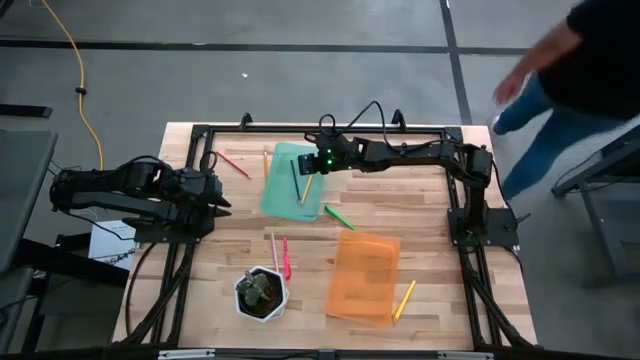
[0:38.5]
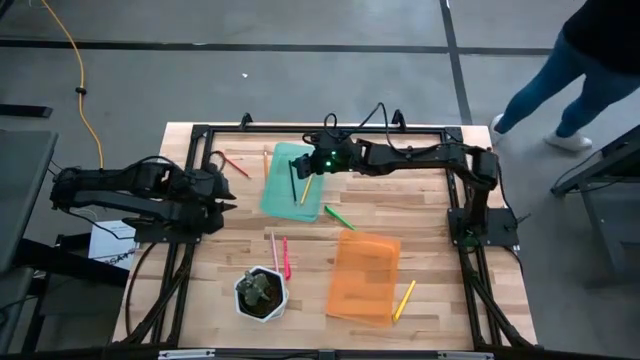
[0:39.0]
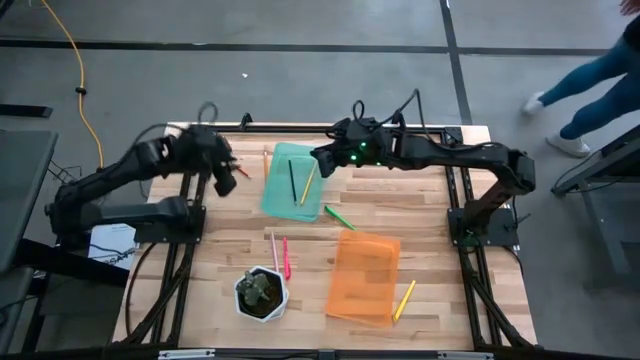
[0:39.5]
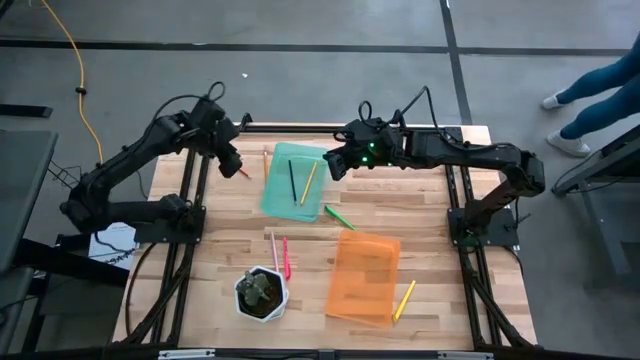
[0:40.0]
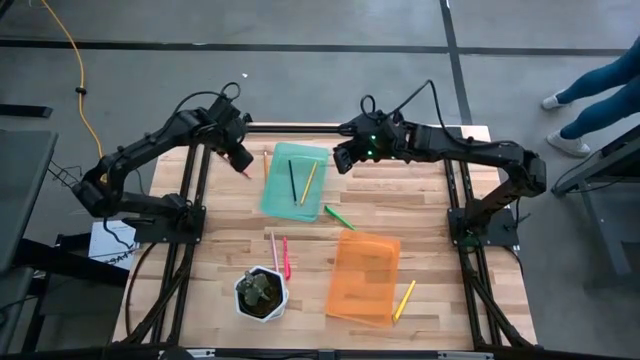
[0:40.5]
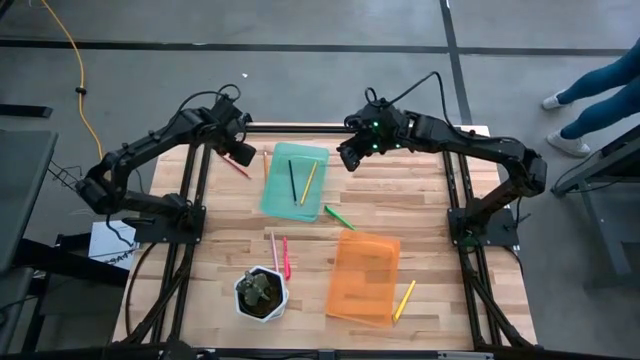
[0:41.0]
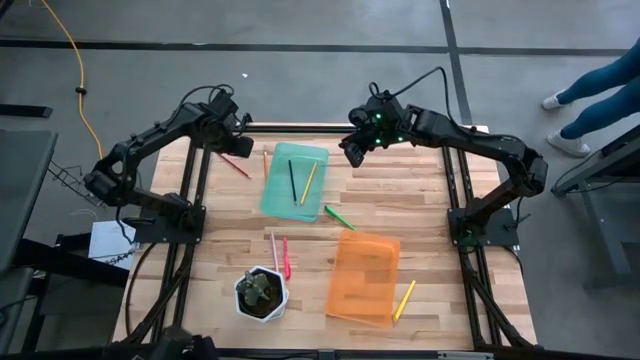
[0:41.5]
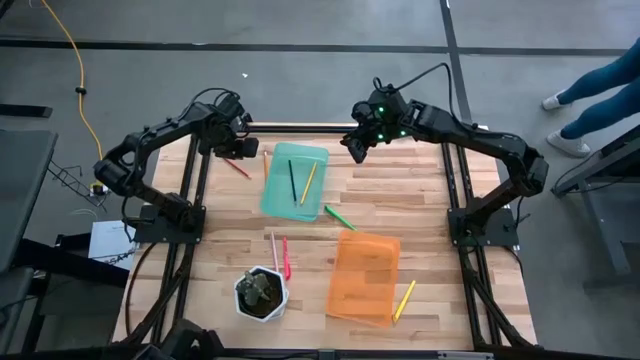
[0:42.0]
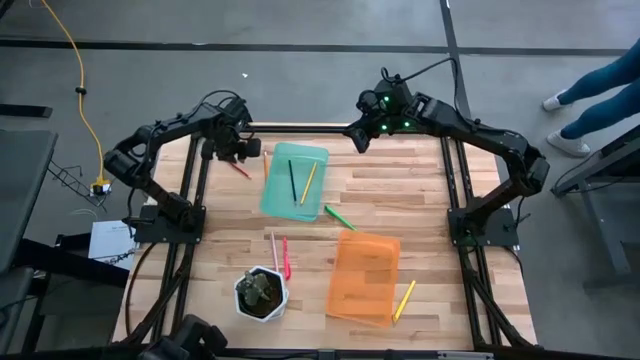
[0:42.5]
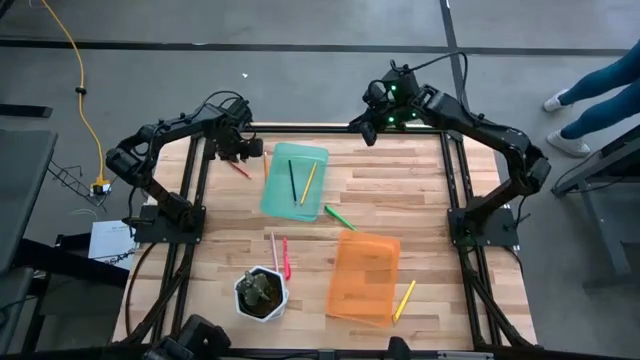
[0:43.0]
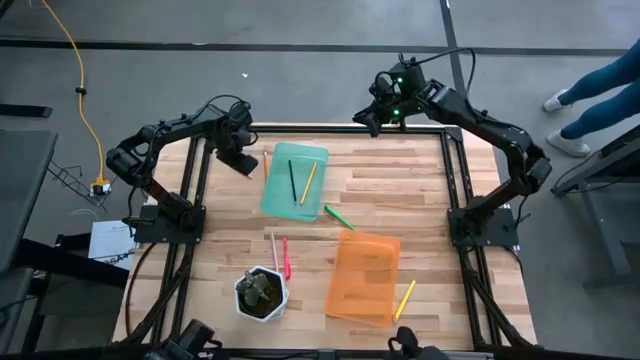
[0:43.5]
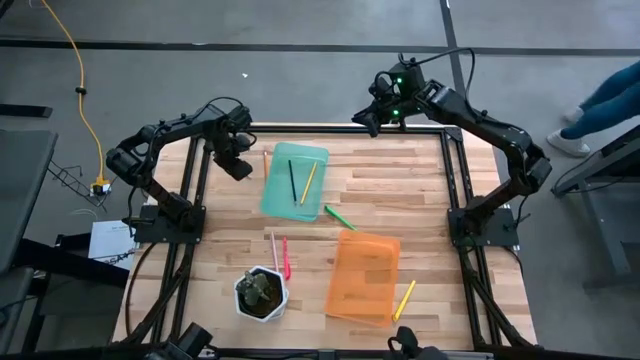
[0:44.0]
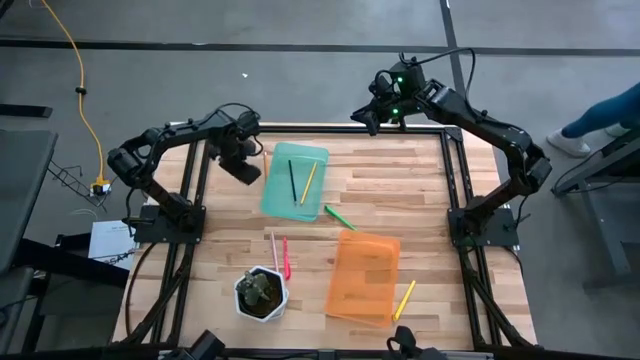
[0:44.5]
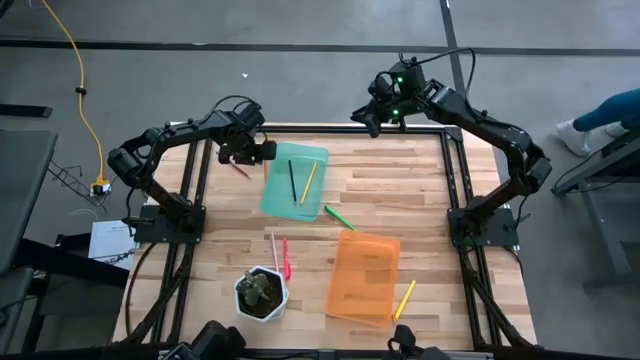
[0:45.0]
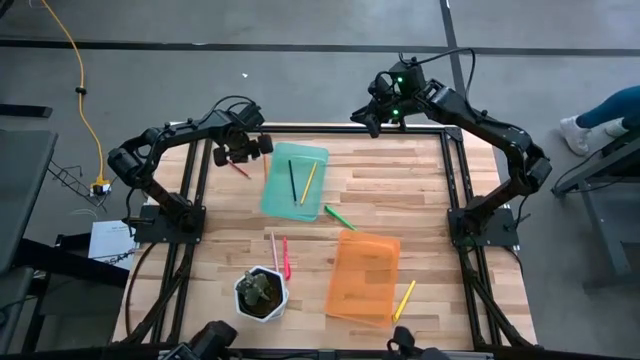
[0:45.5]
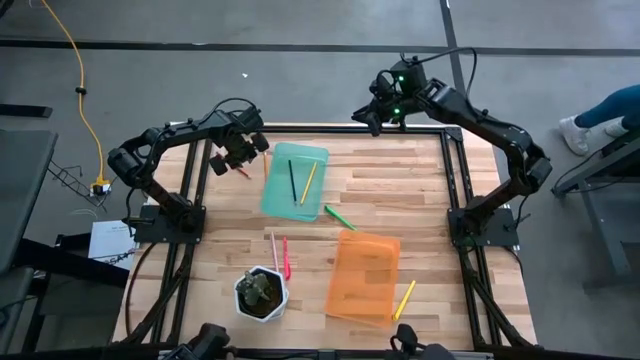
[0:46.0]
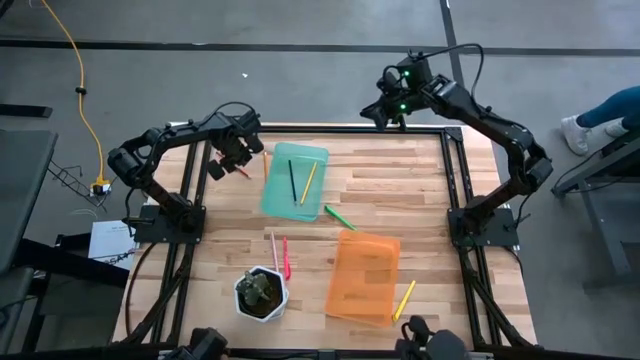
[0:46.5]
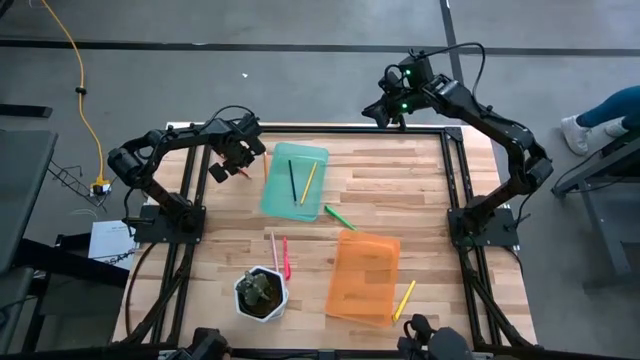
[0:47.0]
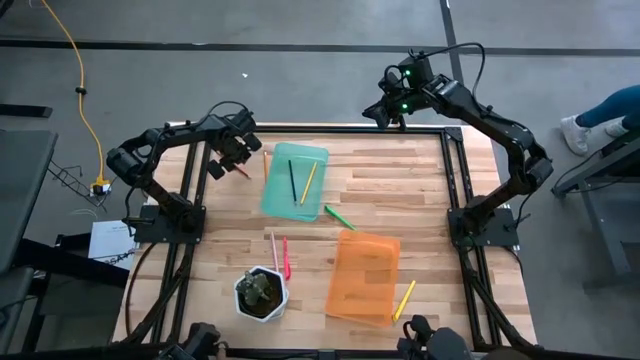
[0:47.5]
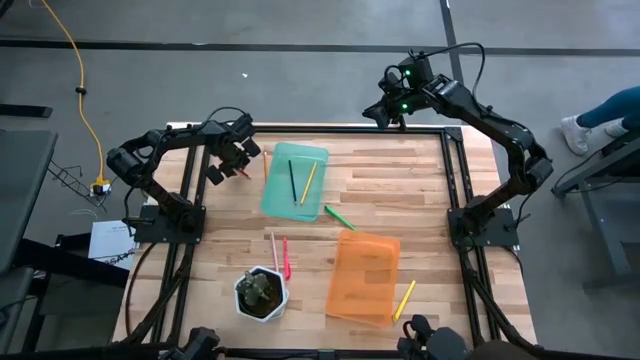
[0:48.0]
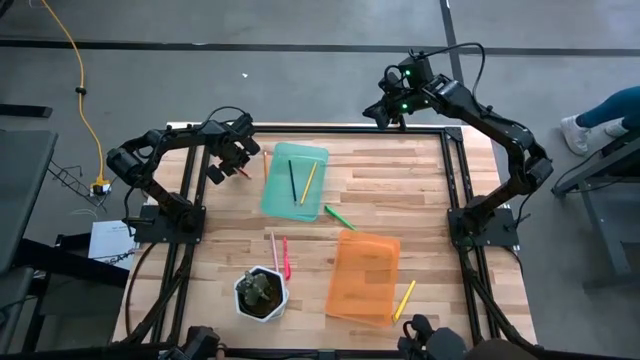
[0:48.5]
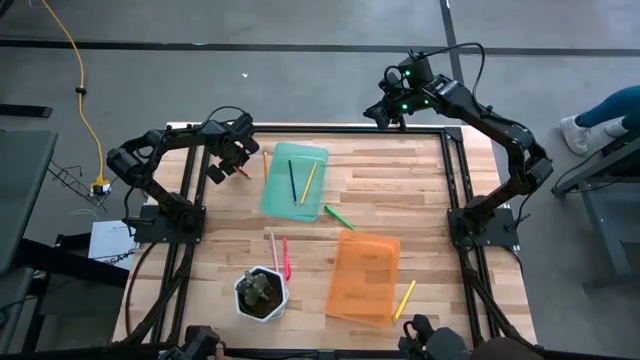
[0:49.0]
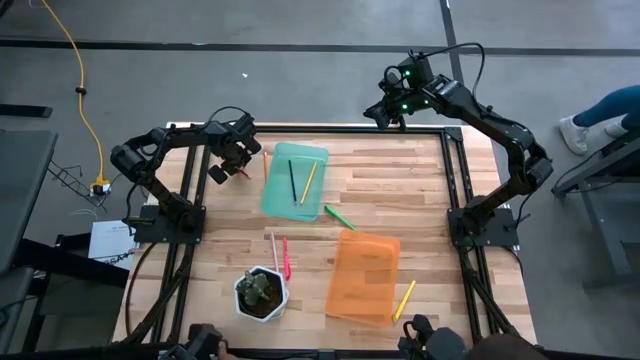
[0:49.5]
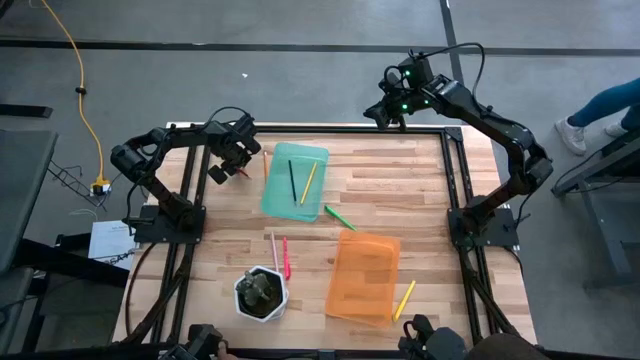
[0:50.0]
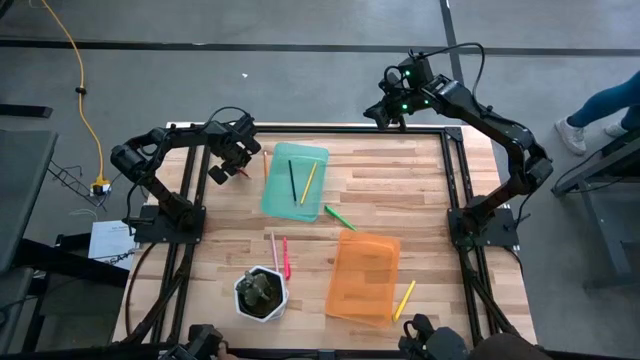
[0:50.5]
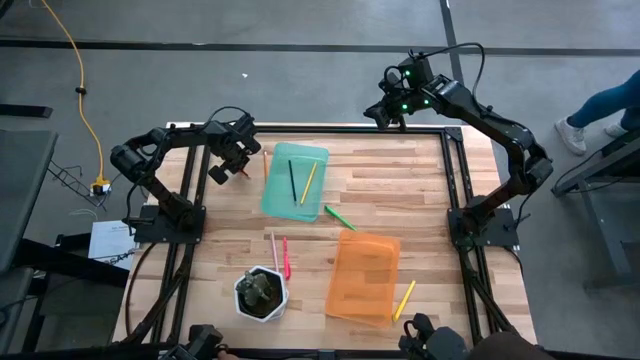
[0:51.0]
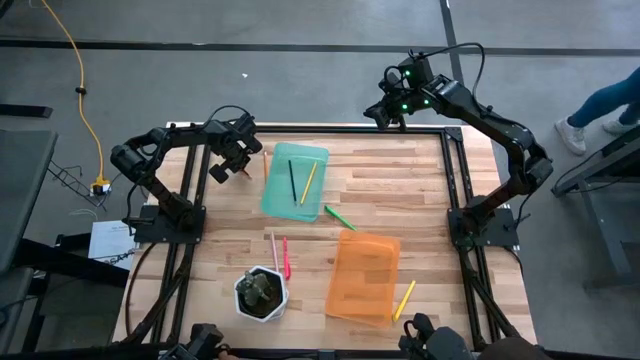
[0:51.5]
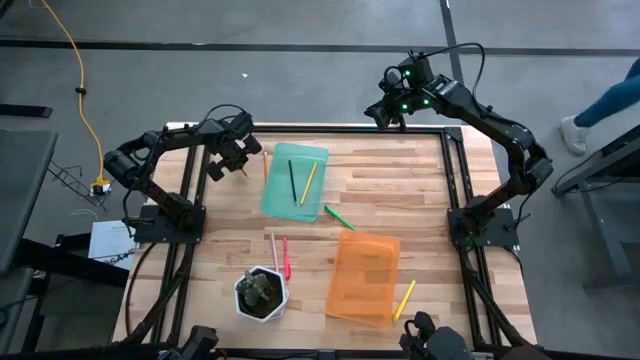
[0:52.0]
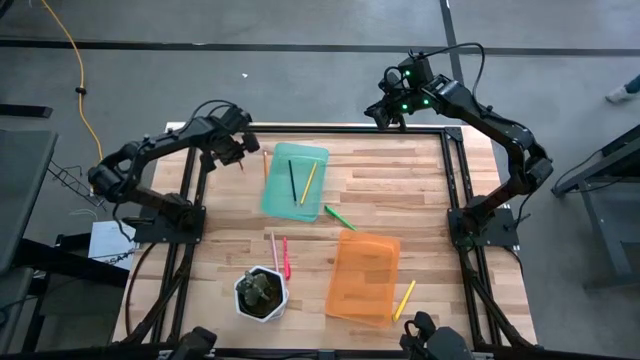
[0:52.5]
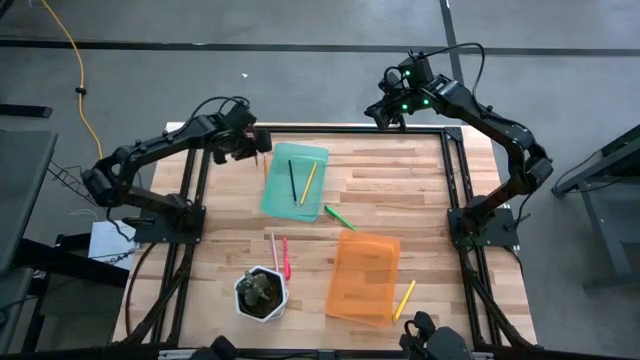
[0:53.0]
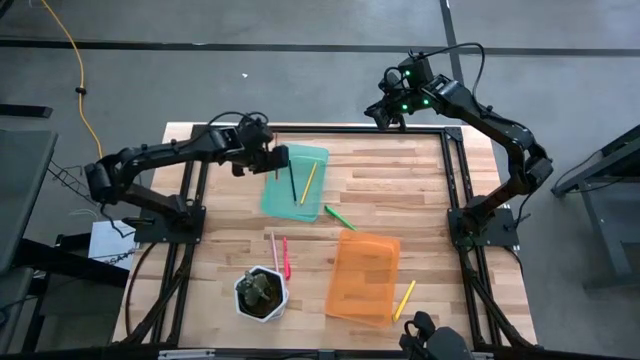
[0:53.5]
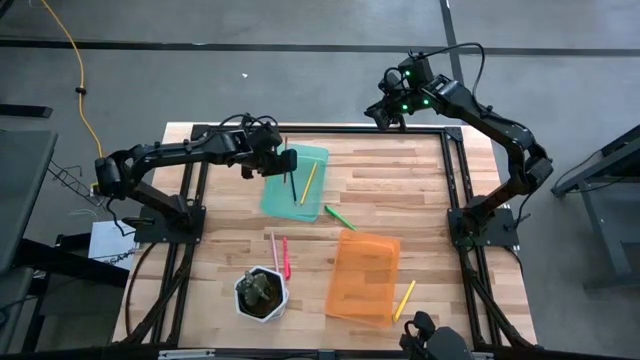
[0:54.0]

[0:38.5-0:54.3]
Task: Sort pens & pencils
Put the red pencil into the green bin
